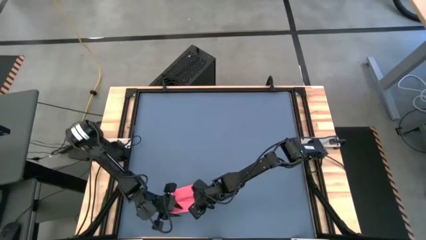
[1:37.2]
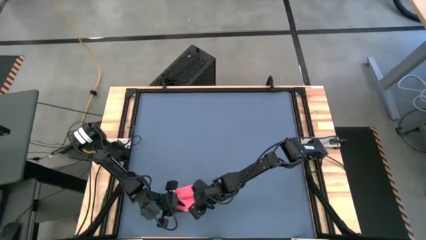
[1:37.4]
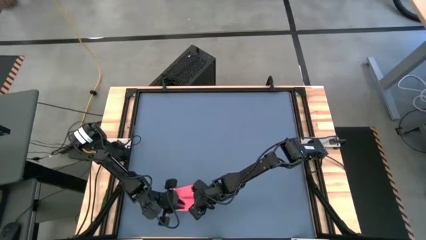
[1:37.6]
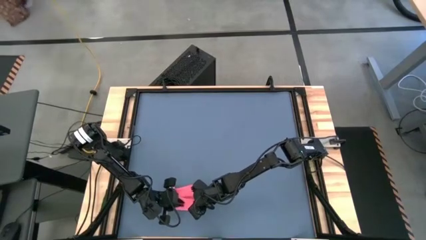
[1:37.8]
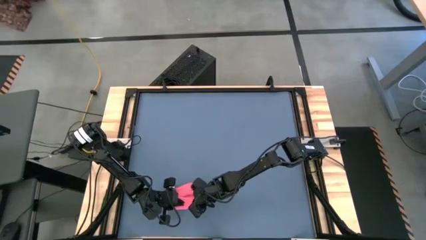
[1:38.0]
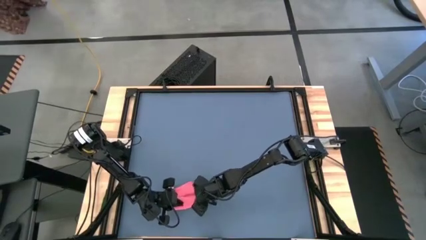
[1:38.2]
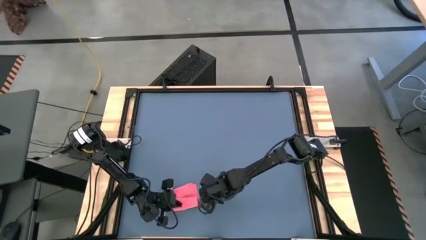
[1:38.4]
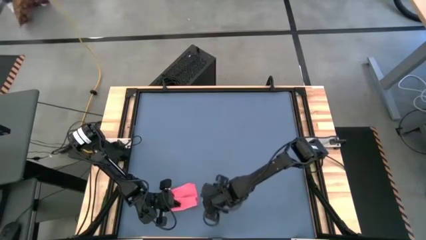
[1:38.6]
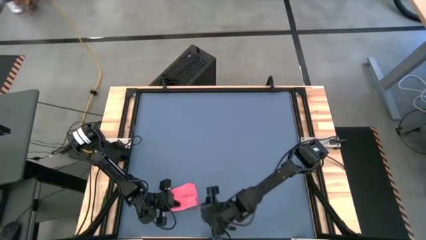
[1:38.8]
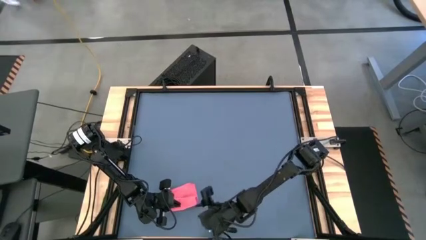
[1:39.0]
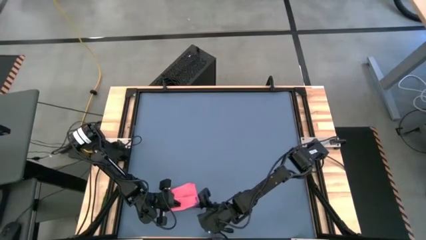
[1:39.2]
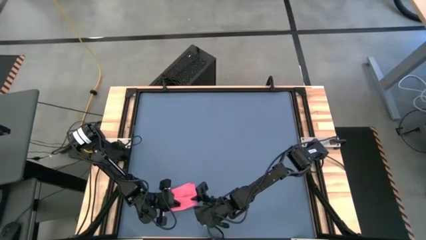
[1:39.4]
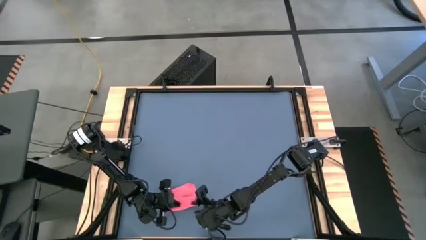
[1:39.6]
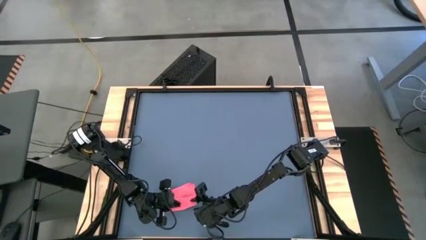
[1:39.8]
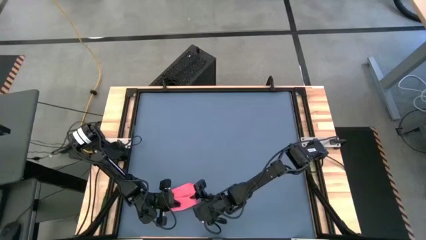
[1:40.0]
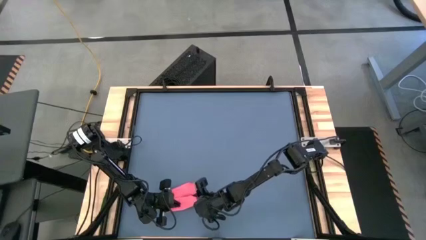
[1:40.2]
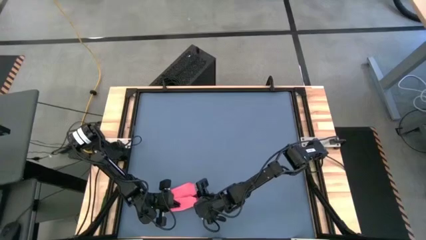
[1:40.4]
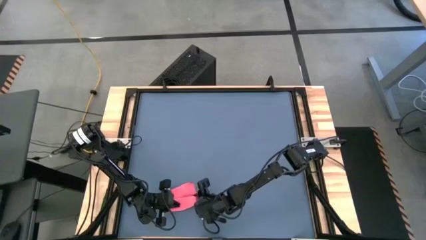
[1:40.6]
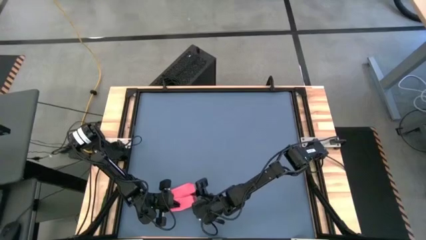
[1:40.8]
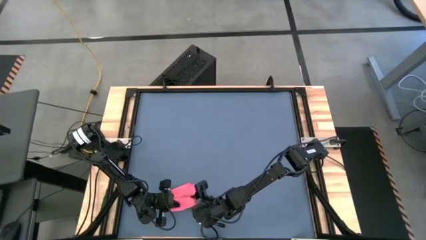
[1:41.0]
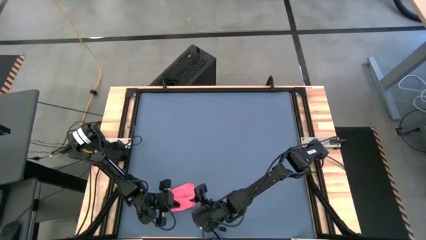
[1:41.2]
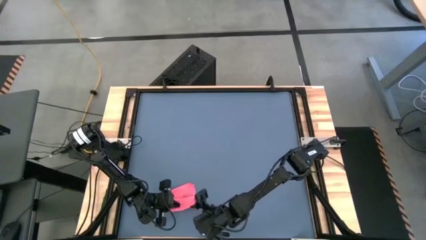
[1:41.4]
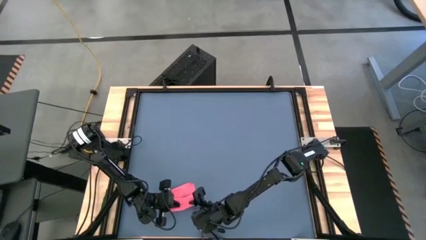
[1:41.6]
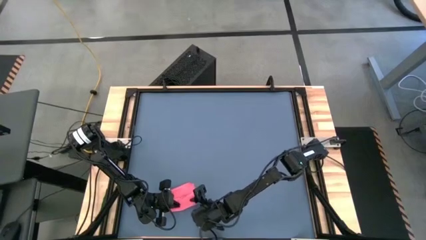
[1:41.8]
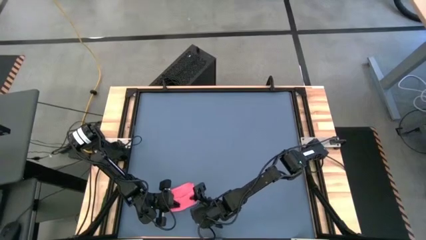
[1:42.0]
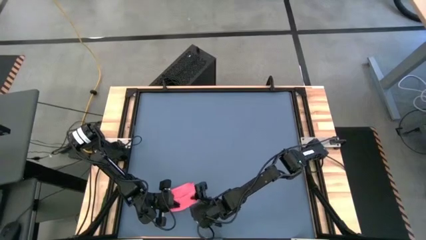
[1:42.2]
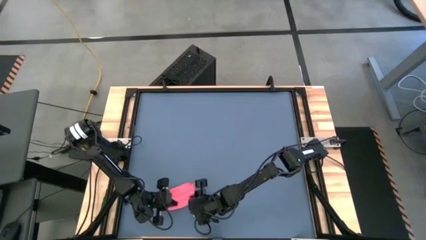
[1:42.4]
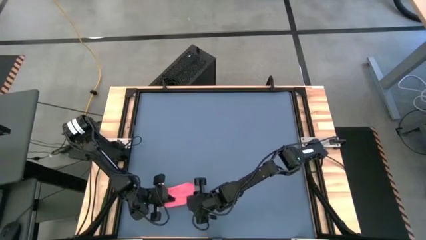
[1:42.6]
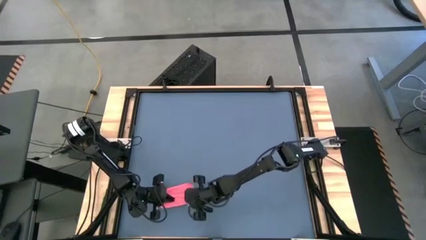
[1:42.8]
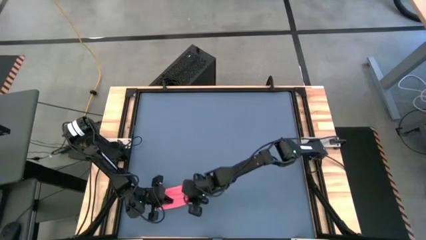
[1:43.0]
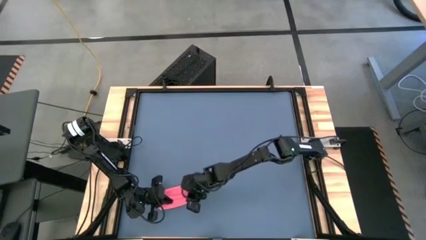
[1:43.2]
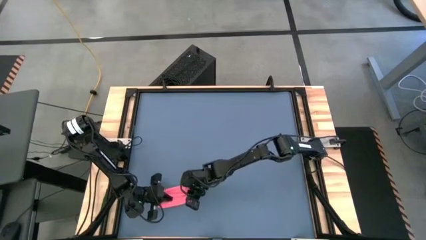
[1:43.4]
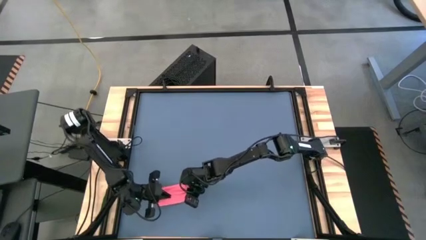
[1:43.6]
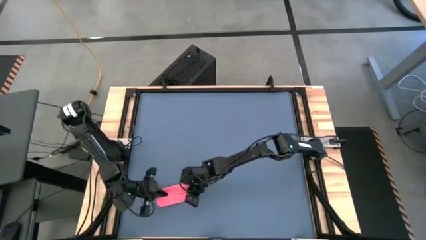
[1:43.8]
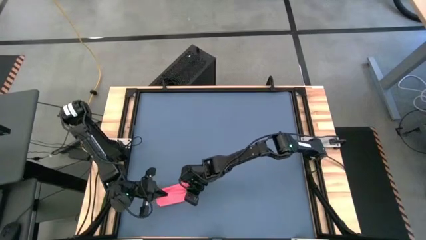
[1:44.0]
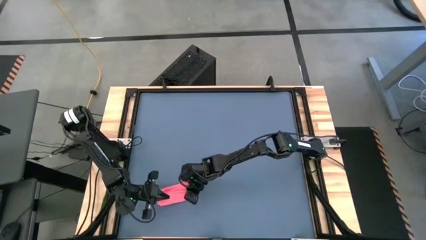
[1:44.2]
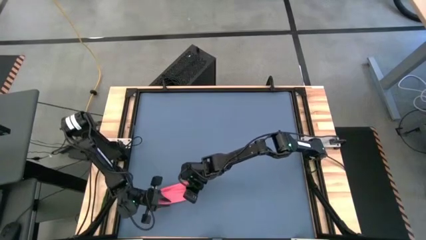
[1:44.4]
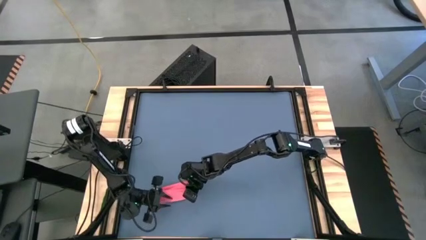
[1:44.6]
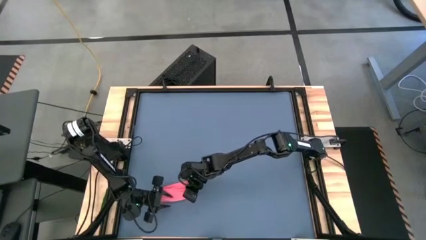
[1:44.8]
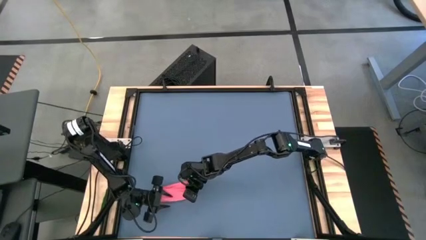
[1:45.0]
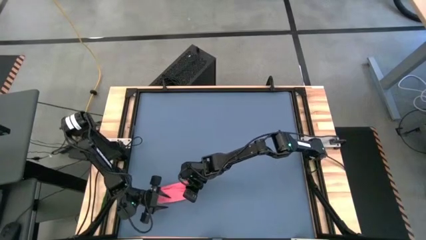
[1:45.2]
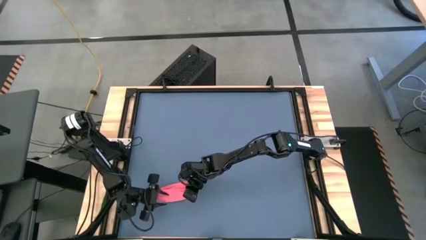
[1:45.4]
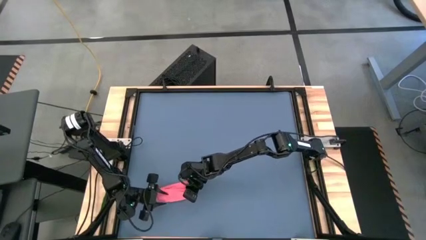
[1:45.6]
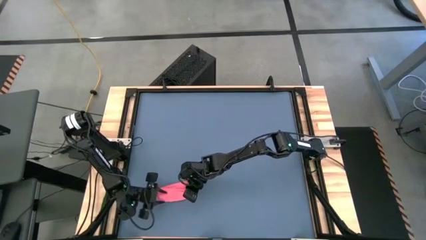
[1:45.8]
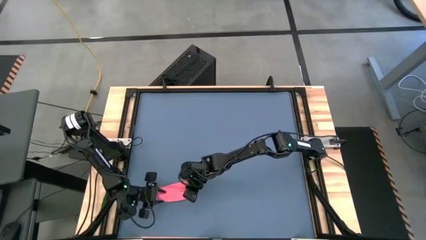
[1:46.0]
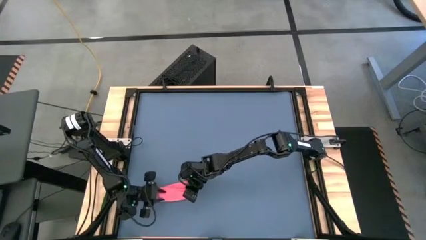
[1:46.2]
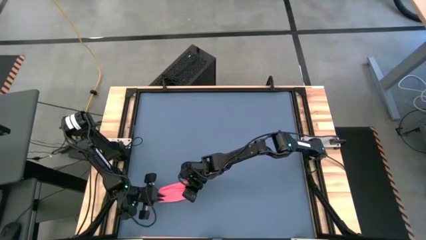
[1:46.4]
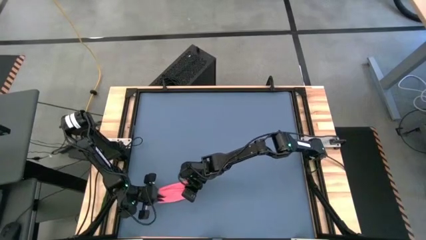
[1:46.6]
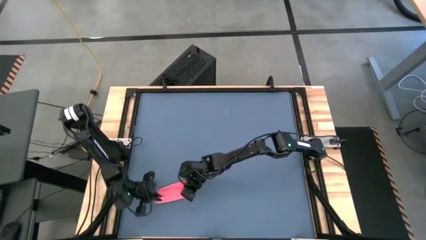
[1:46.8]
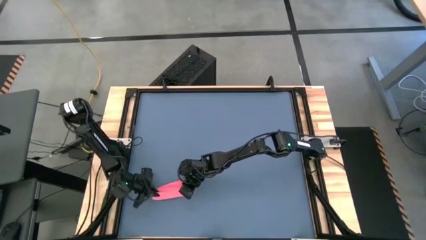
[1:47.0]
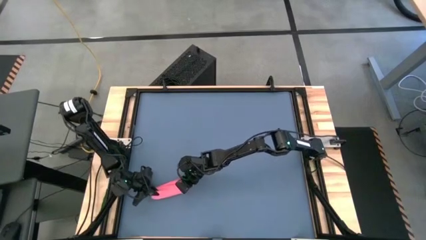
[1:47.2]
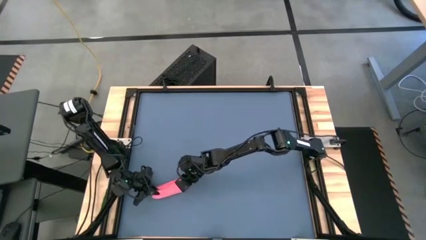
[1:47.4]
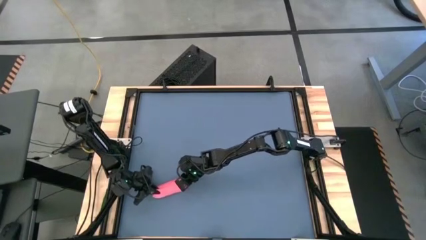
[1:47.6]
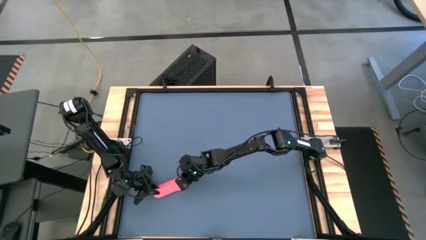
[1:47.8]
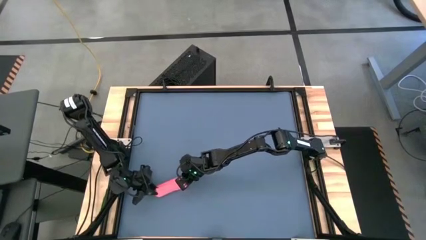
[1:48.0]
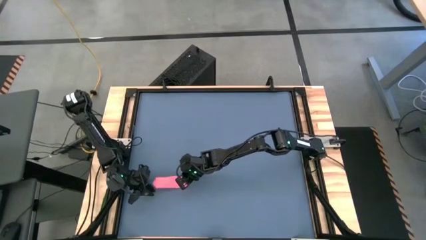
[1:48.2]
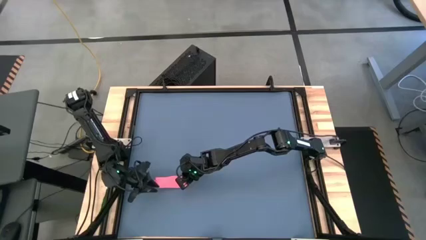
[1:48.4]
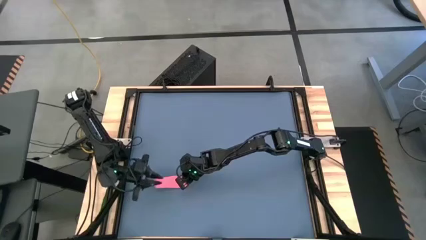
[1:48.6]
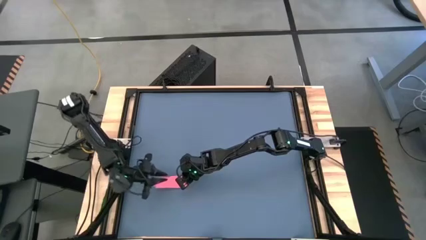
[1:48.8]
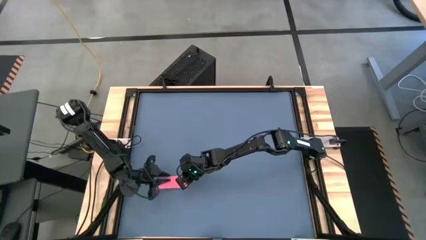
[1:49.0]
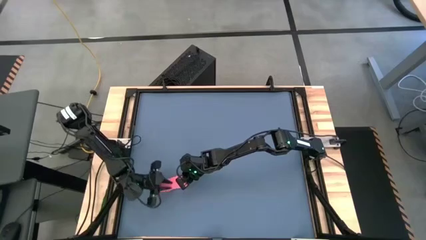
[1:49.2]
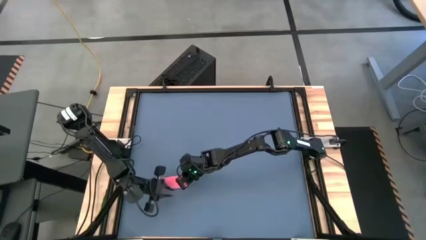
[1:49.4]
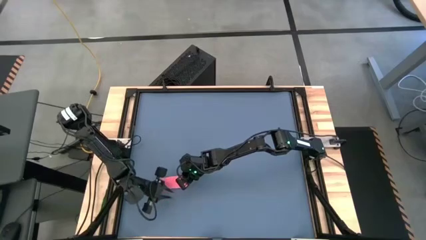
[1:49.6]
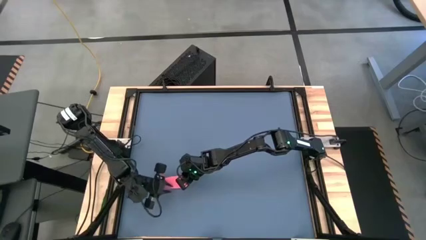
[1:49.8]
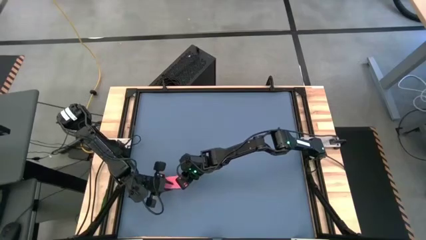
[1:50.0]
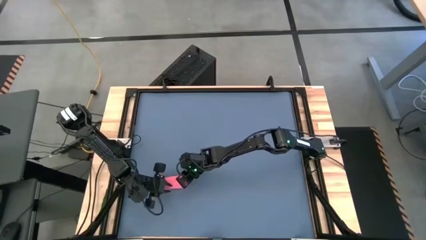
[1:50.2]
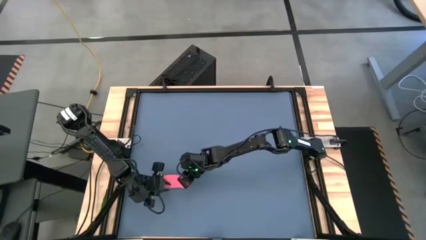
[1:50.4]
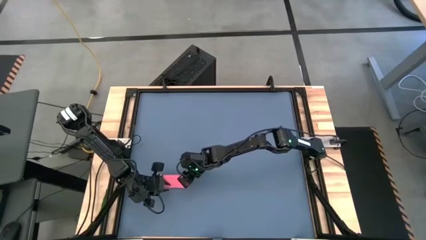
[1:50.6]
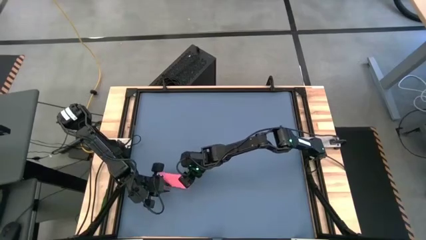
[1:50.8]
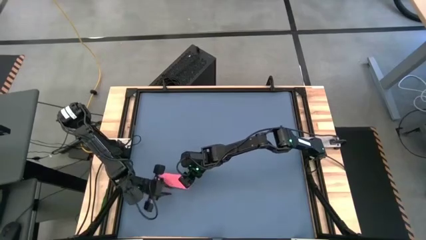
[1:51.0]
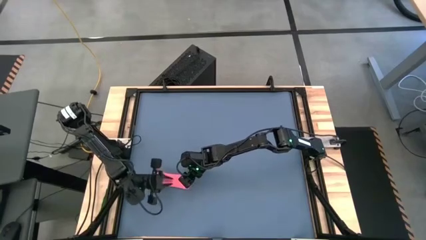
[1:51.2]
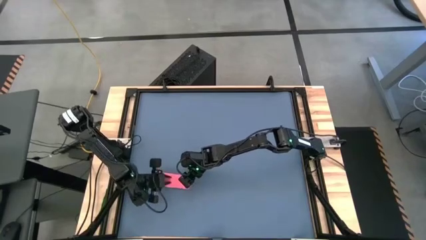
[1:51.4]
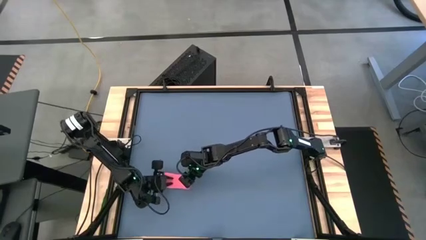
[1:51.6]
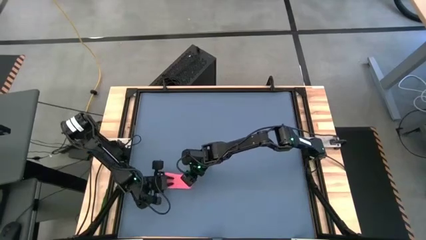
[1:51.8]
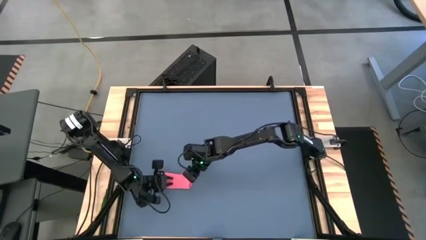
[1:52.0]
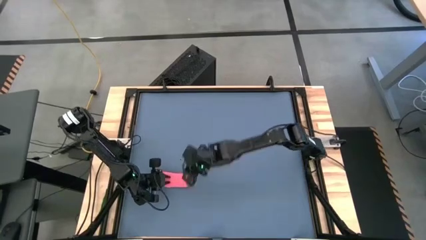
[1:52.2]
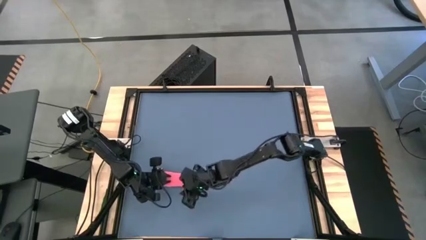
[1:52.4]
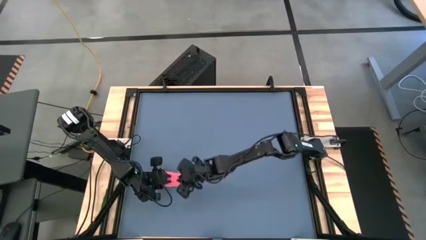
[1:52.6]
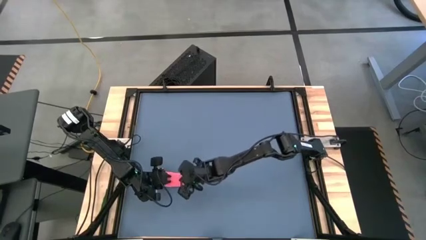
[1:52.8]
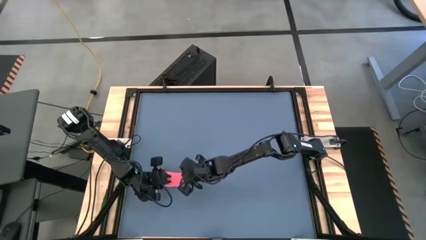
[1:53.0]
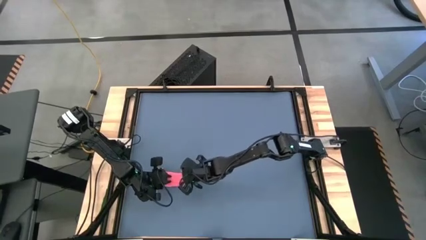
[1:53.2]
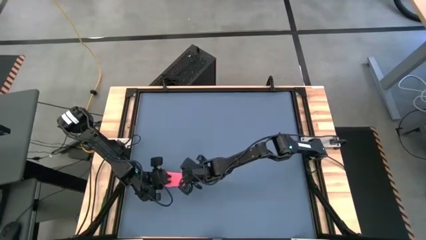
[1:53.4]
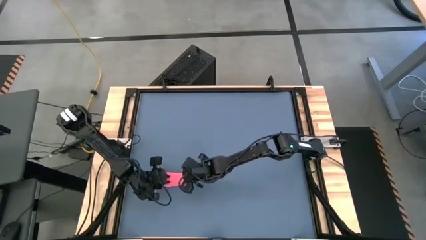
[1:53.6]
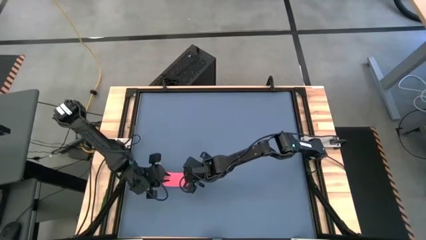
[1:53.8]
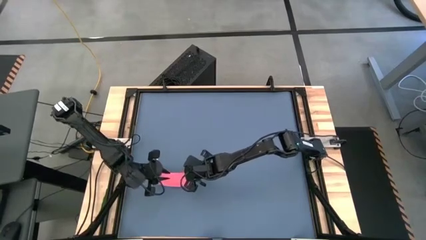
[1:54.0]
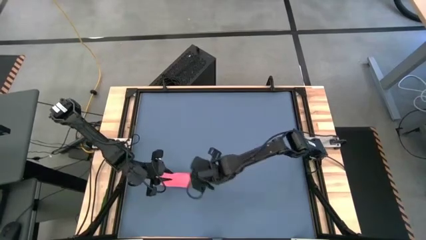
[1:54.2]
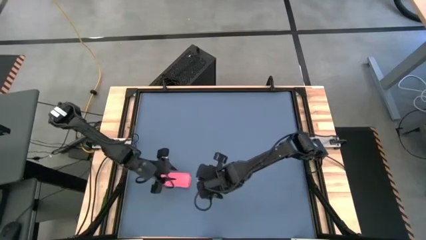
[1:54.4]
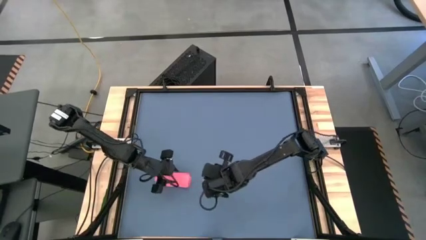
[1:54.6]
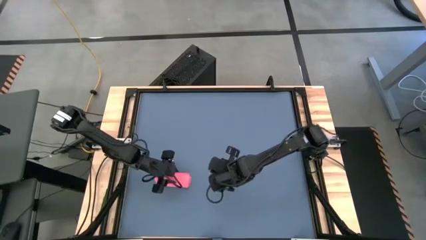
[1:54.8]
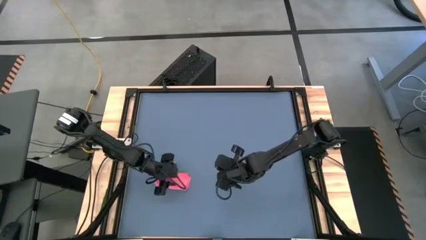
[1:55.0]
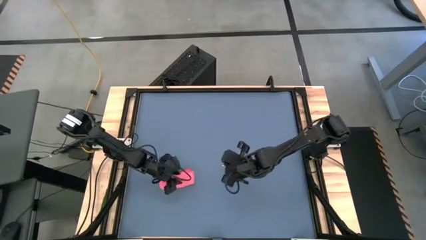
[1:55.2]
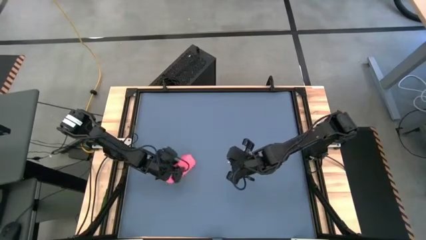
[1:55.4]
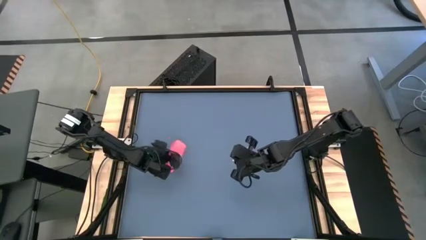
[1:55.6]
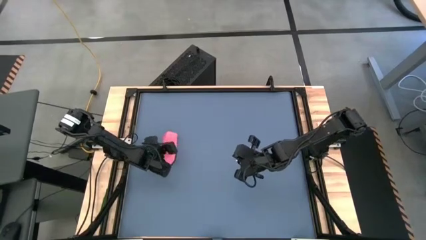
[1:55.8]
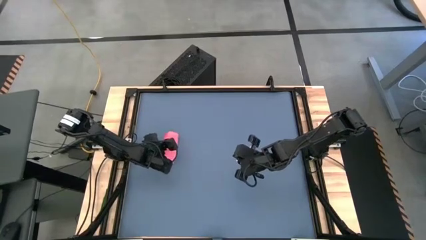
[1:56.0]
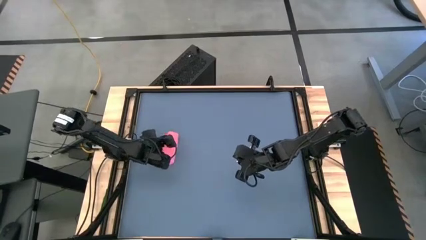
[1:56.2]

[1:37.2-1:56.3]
Task: Roll towel into tight, uniform cylinder
Roll the red towel
